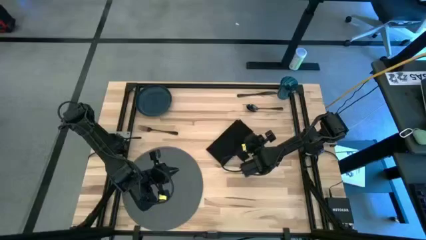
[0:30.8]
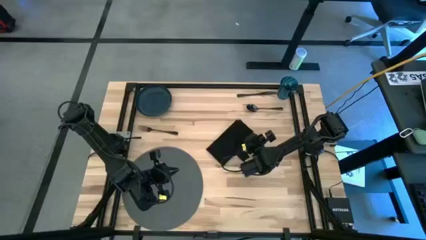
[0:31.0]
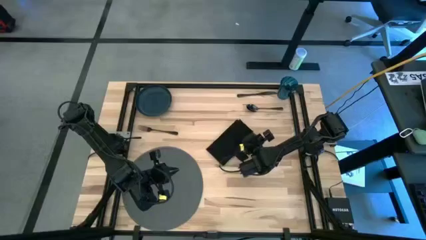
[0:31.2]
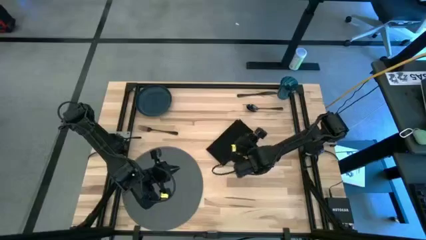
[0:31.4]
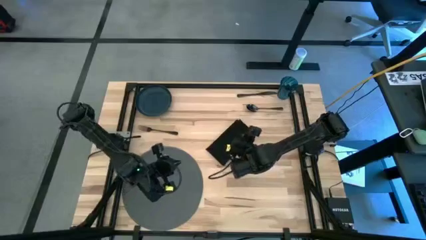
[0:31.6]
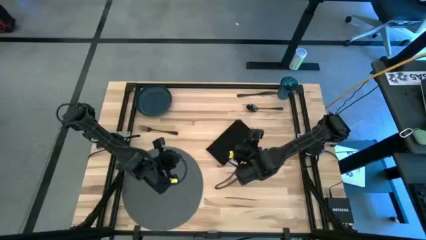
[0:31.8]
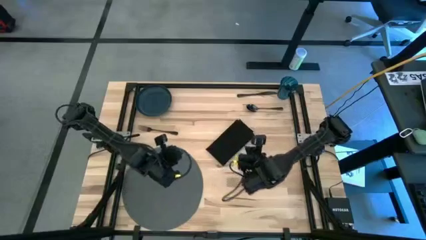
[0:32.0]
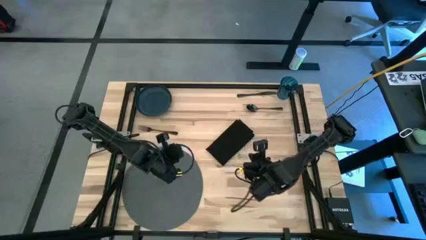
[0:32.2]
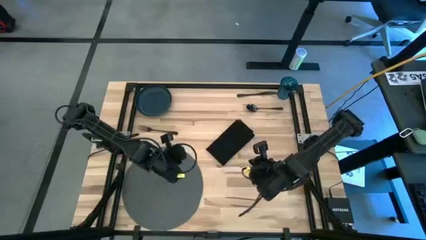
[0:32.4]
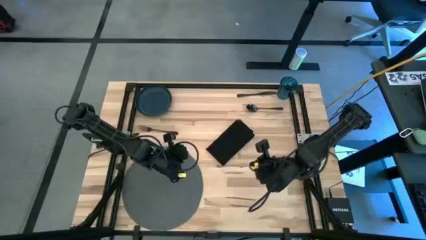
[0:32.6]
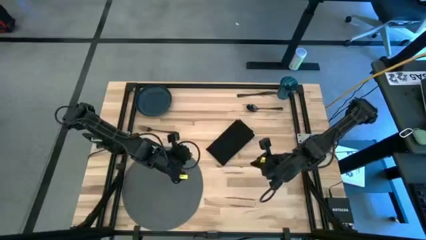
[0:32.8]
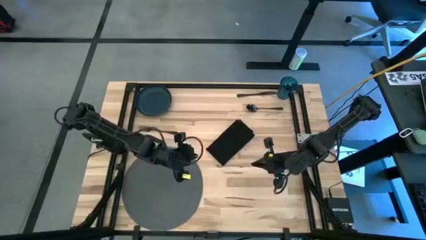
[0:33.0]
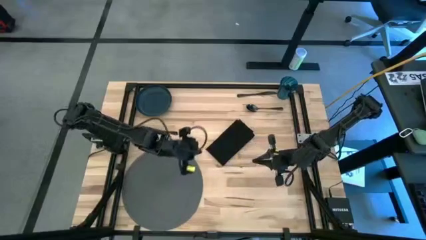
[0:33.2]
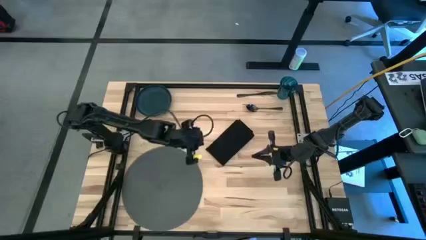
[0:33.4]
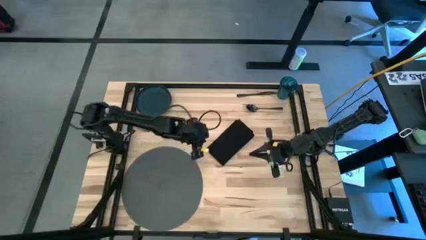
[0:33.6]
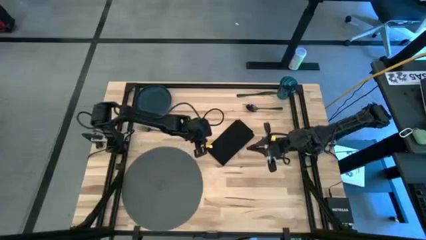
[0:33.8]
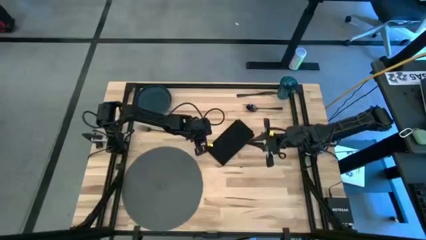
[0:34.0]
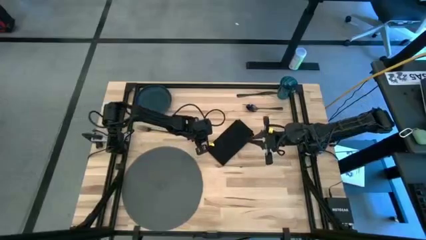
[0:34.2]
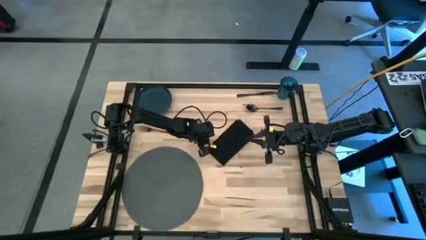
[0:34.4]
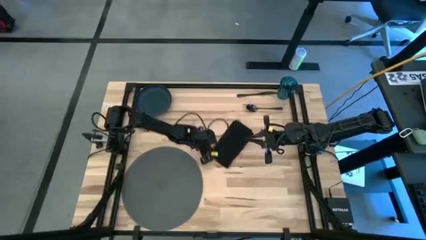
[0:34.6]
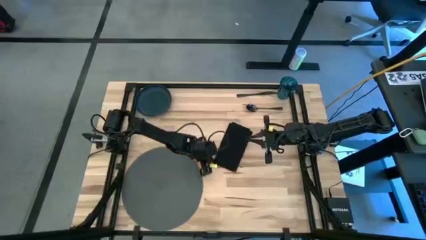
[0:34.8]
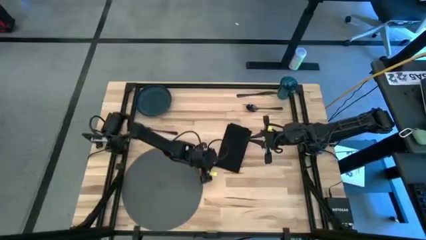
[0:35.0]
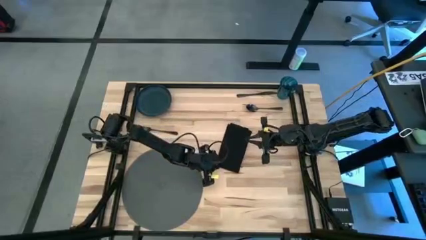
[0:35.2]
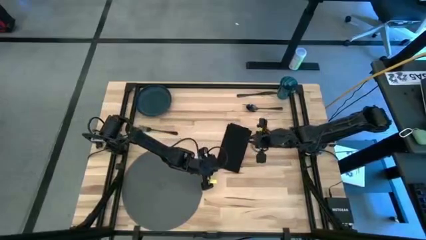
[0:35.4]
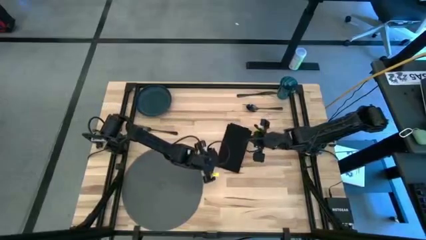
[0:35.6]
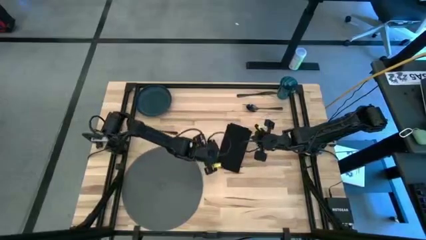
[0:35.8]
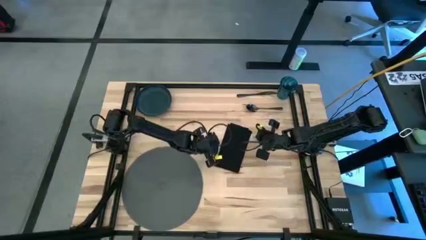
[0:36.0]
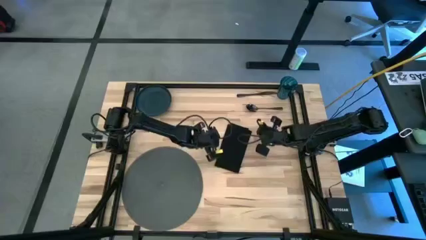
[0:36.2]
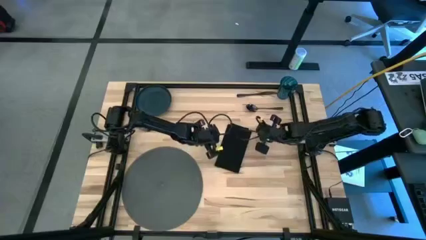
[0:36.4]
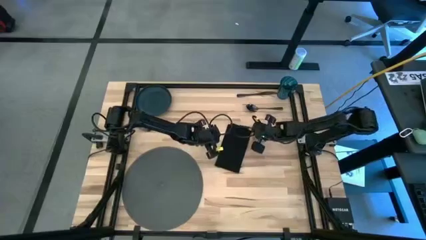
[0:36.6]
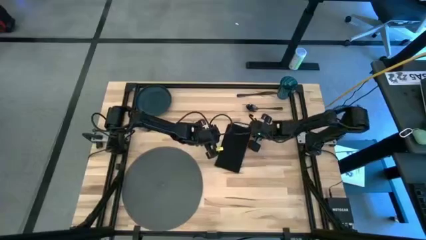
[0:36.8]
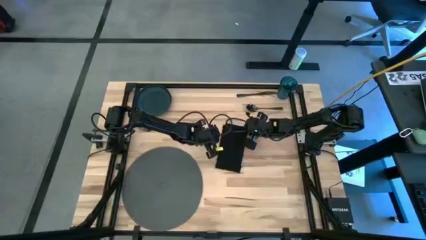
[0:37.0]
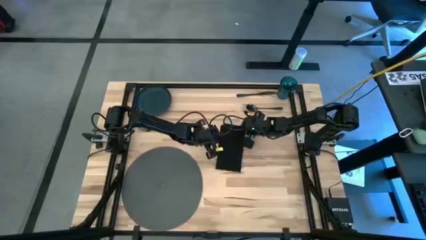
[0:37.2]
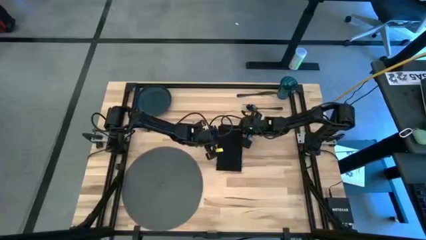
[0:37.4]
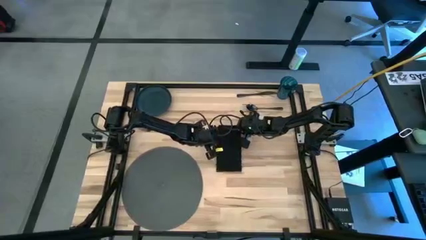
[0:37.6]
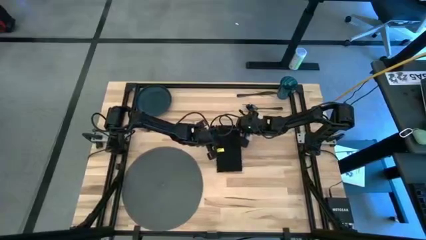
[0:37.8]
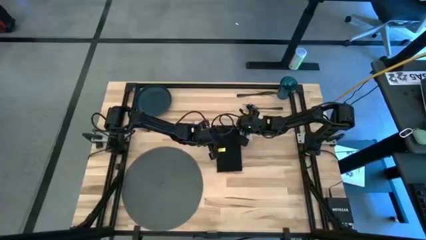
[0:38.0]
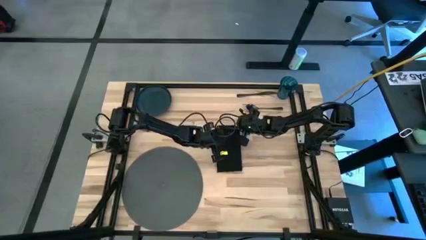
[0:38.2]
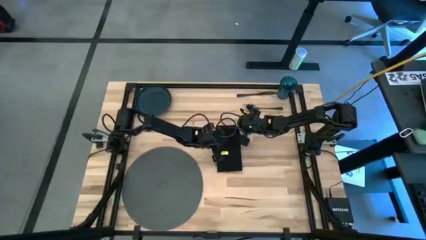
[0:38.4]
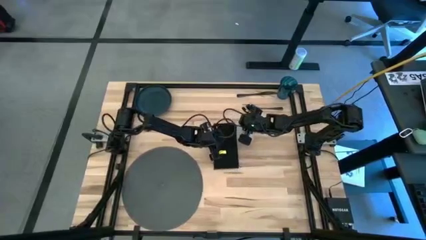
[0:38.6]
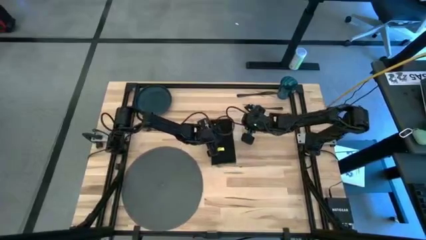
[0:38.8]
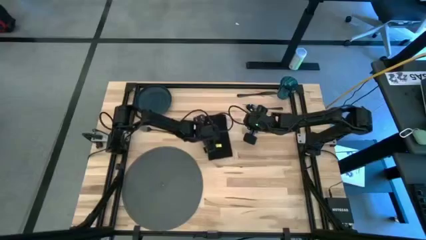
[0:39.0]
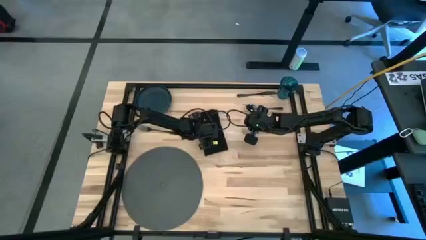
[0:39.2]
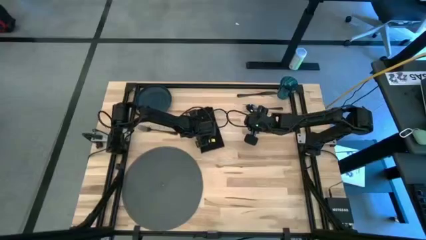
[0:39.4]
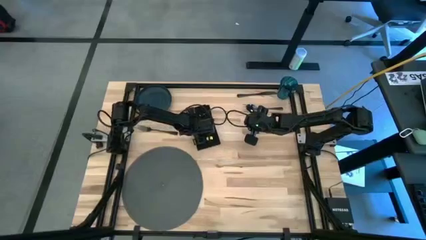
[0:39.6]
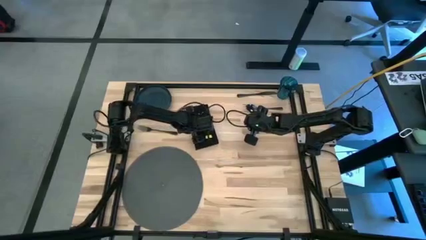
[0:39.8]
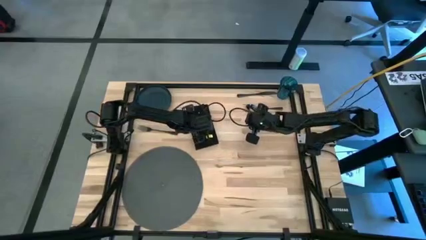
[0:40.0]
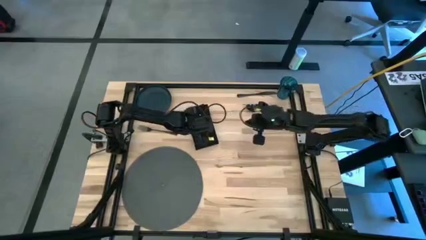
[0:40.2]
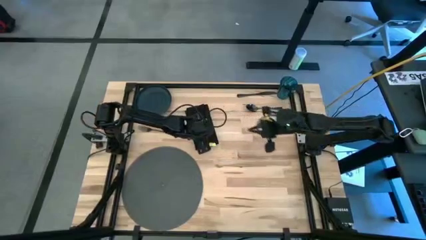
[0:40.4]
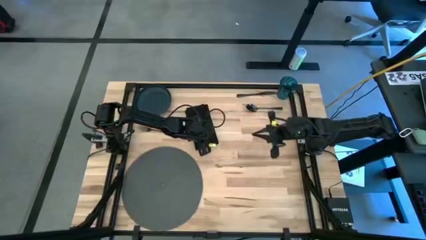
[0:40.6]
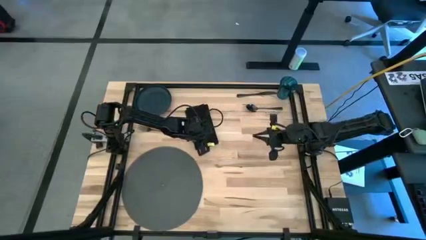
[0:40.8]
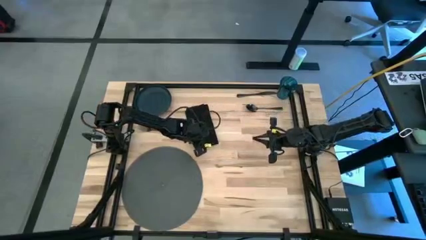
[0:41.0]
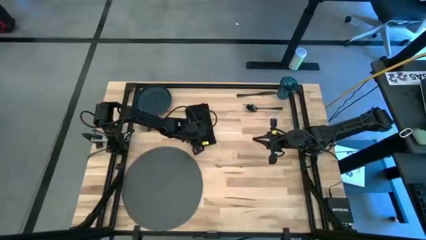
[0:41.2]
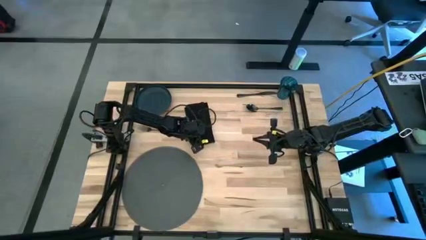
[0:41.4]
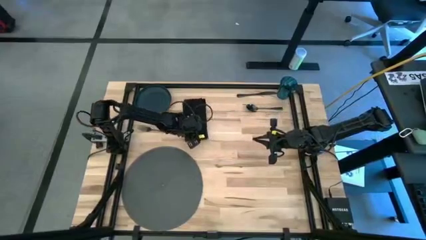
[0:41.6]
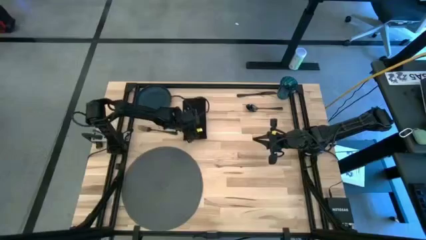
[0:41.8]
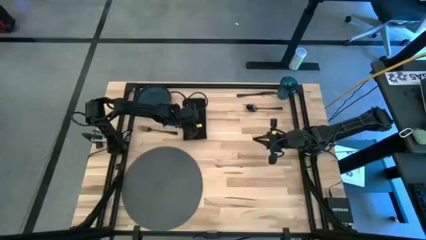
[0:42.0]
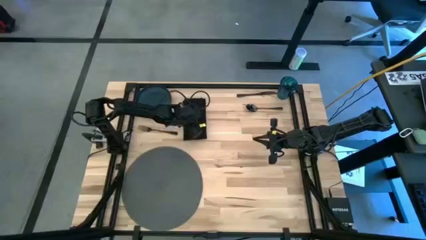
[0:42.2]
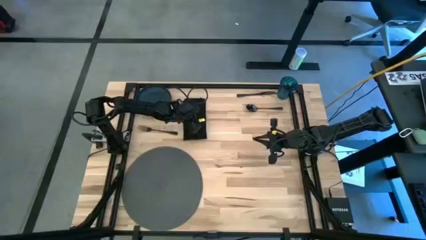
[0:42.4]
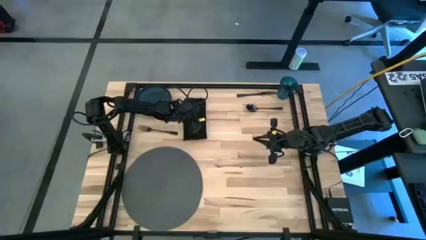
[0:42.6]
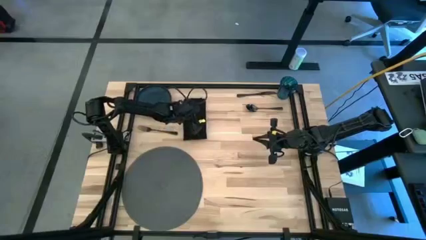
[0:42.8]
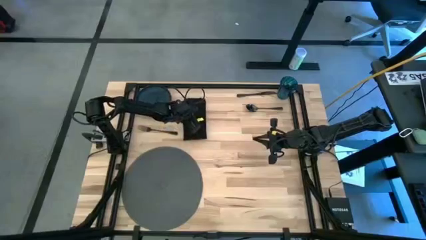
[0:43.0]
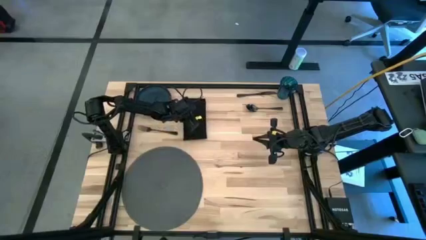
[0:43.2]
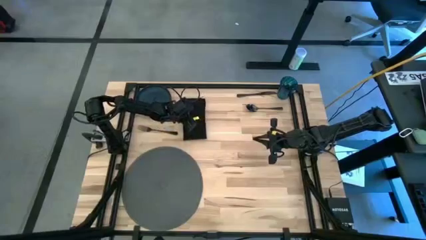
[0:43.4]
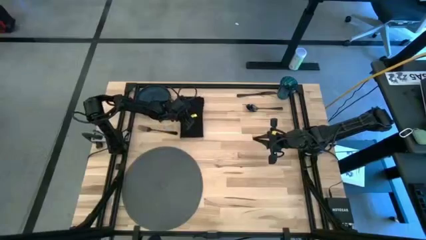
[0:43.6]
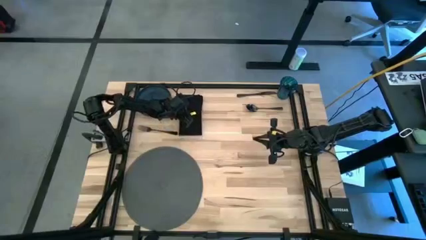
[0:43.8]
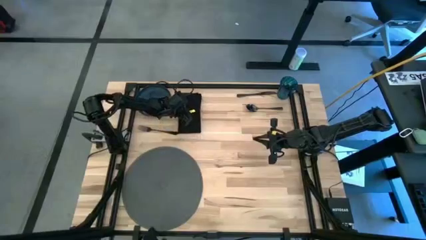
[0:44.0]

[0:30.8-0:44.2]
Task: Set table place
Move the black table napkin to the right of the green plate
